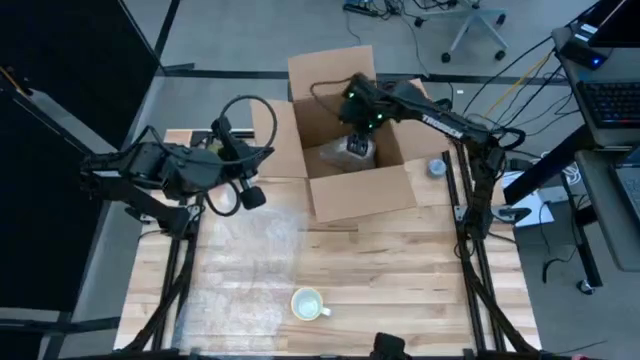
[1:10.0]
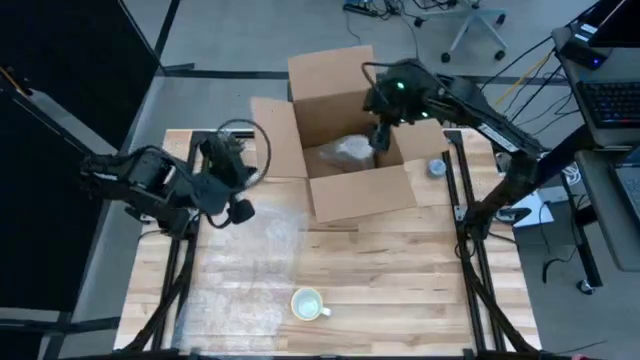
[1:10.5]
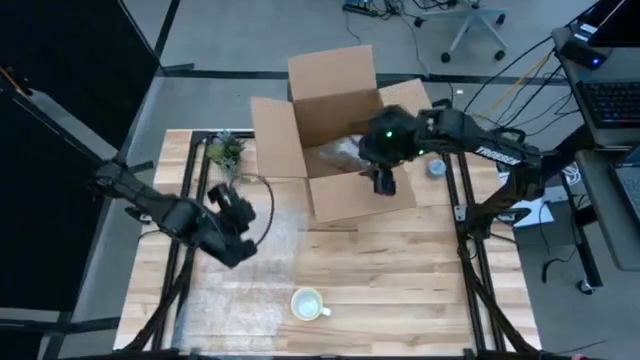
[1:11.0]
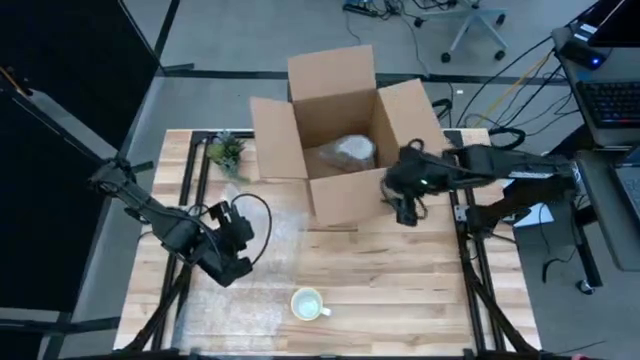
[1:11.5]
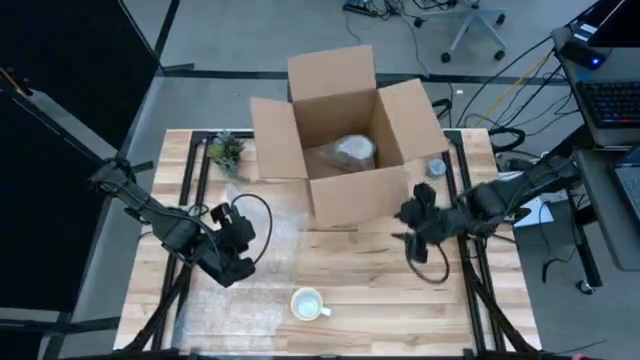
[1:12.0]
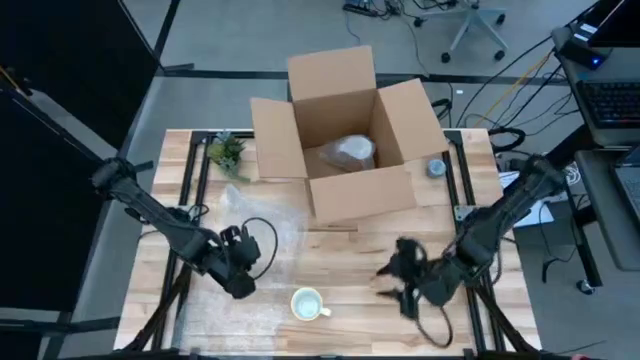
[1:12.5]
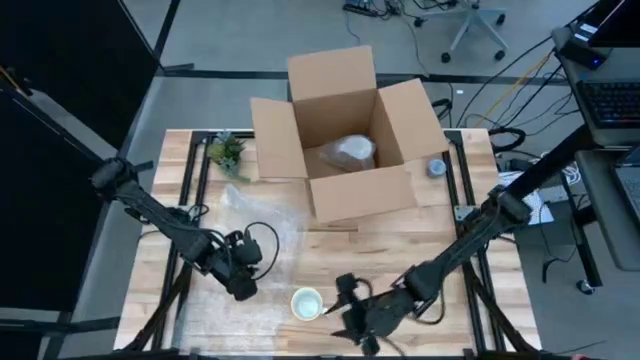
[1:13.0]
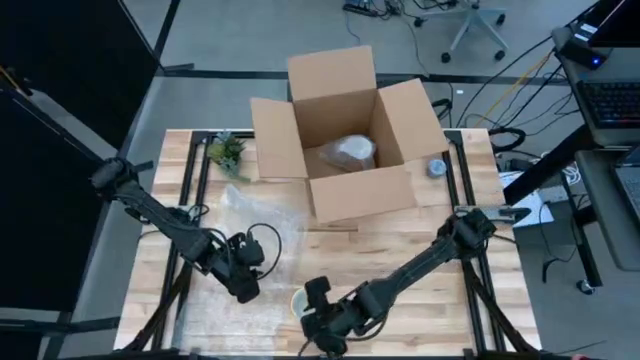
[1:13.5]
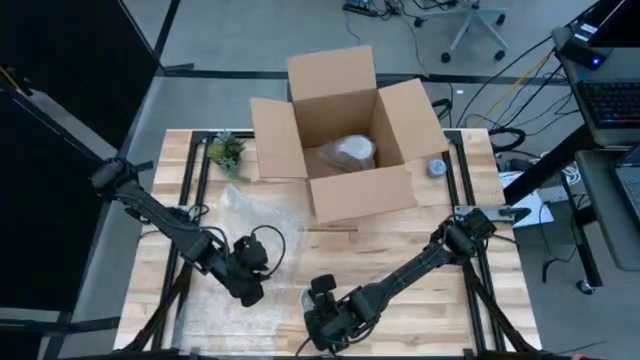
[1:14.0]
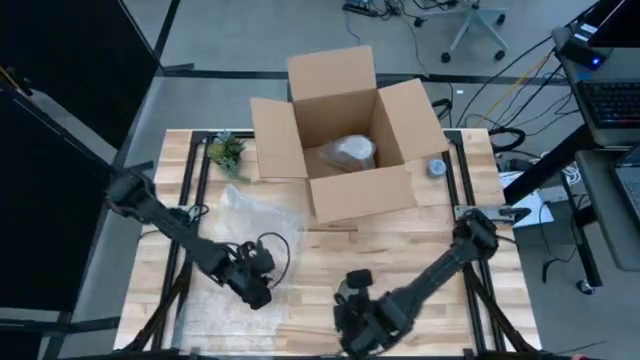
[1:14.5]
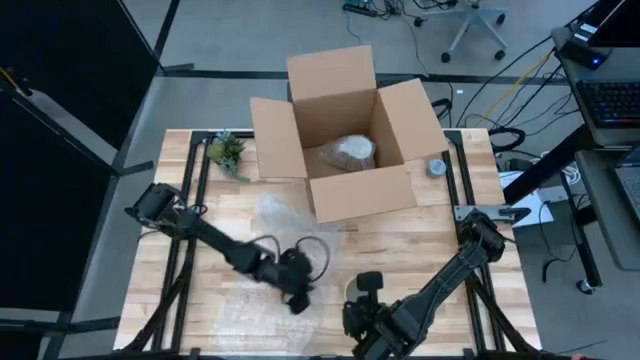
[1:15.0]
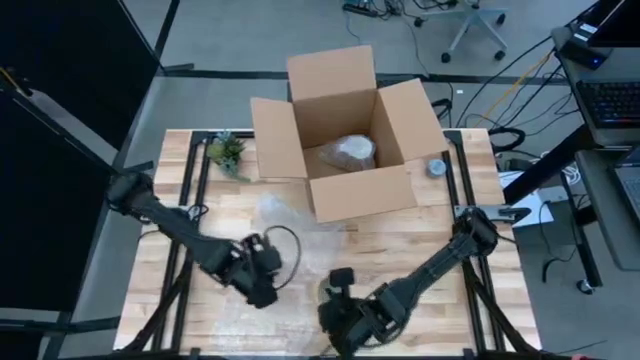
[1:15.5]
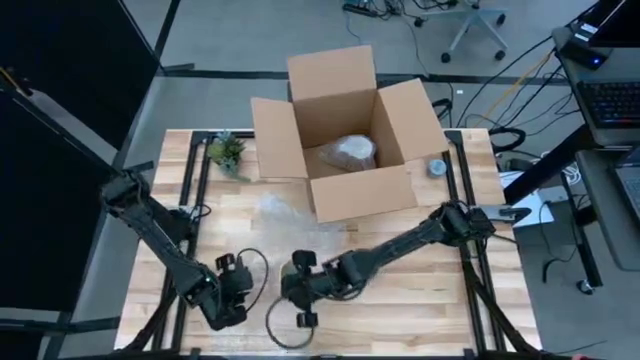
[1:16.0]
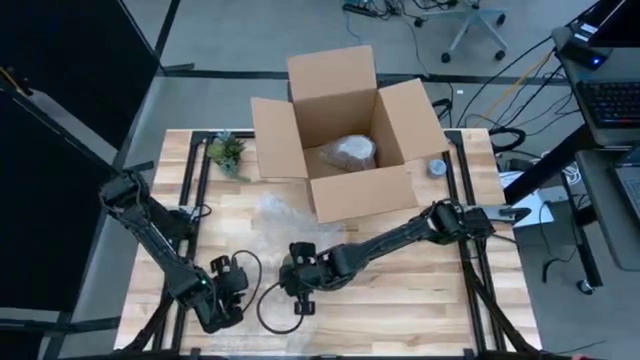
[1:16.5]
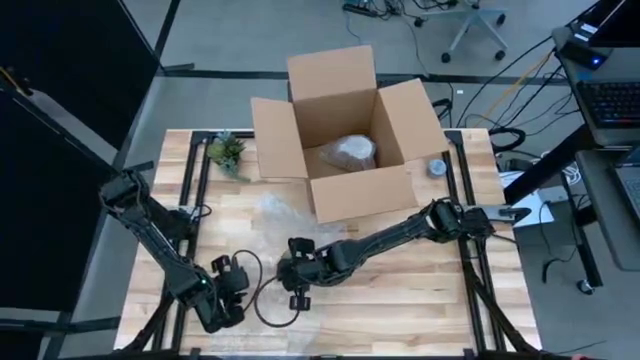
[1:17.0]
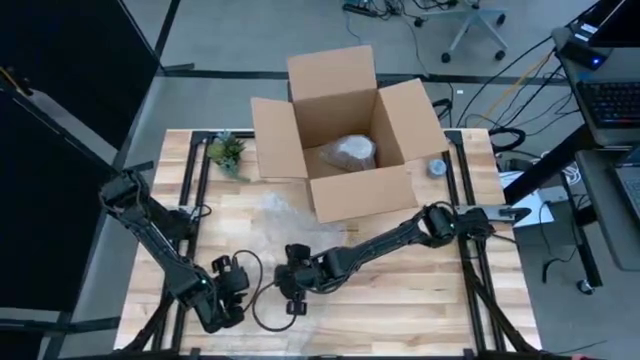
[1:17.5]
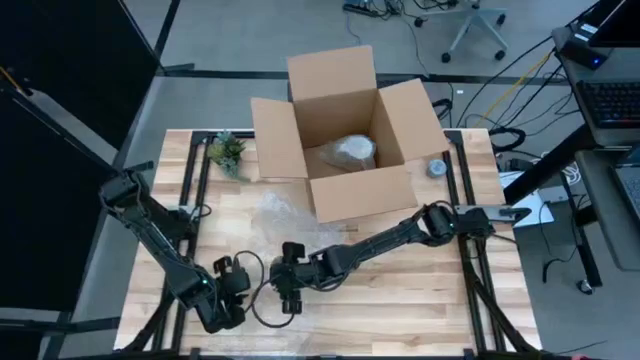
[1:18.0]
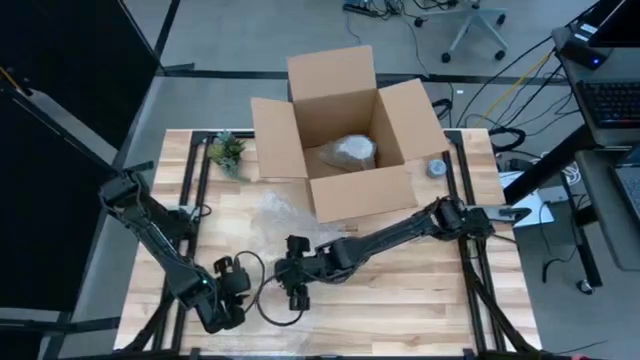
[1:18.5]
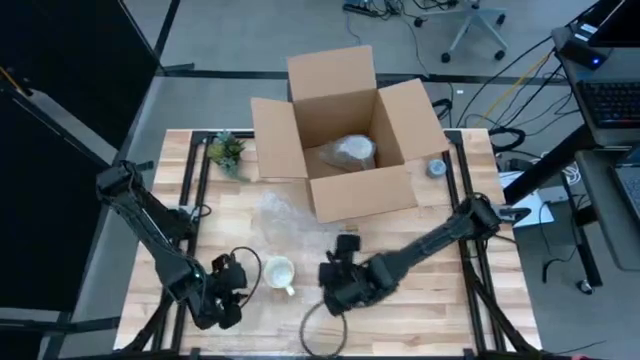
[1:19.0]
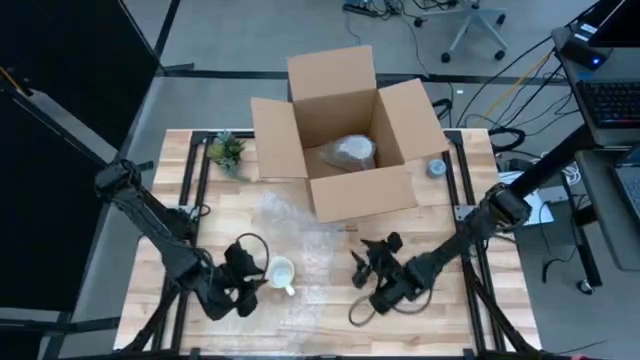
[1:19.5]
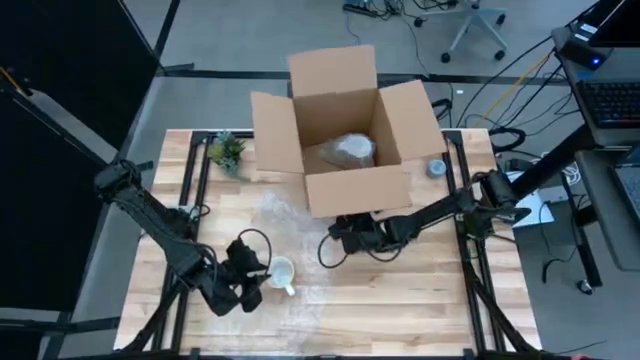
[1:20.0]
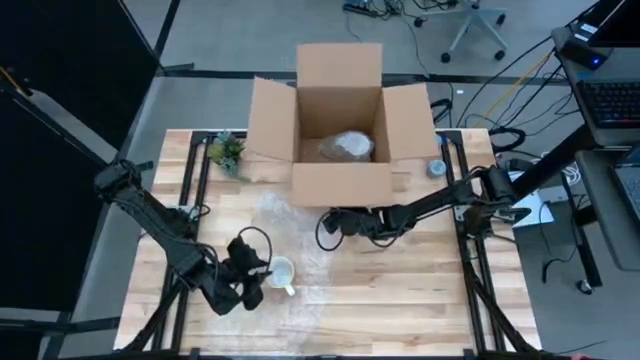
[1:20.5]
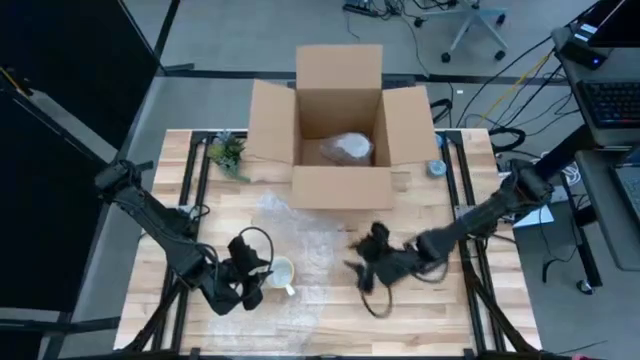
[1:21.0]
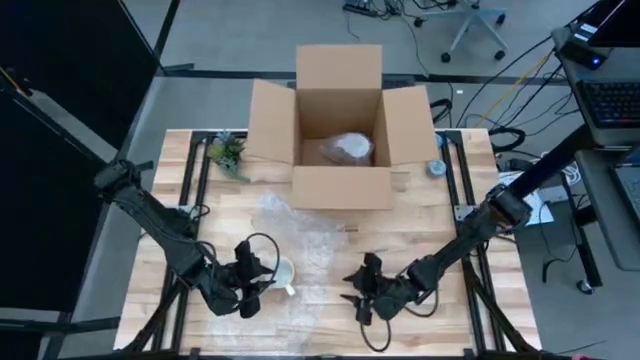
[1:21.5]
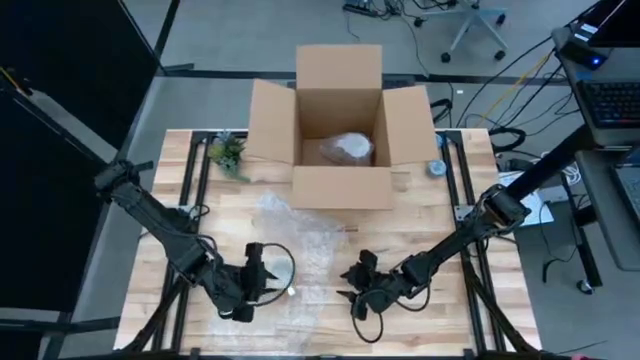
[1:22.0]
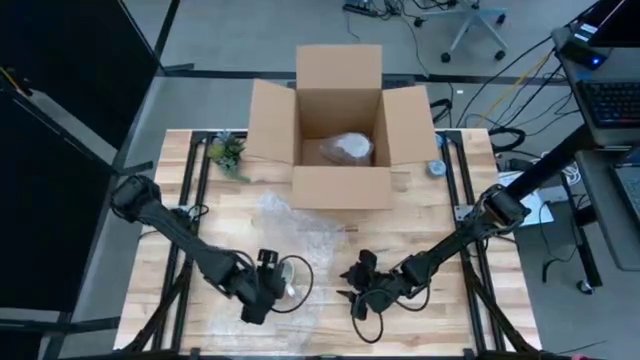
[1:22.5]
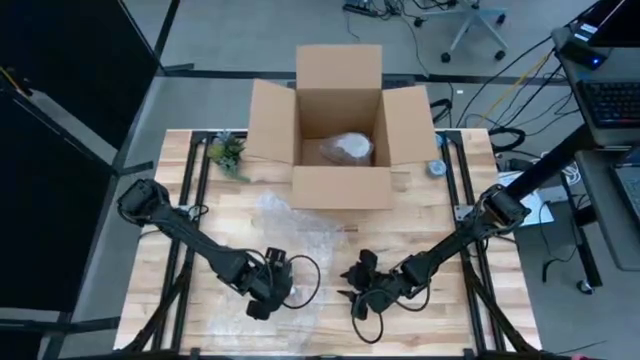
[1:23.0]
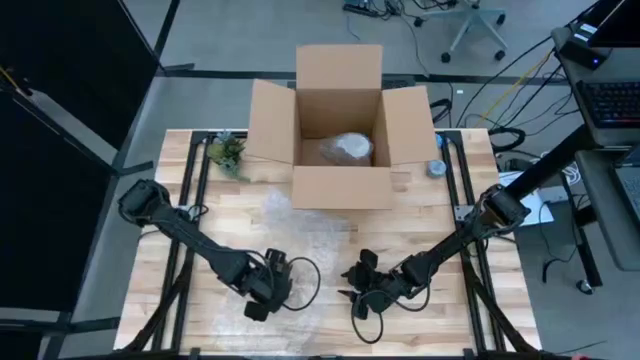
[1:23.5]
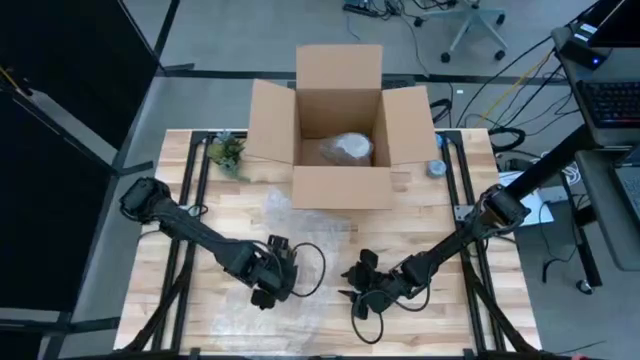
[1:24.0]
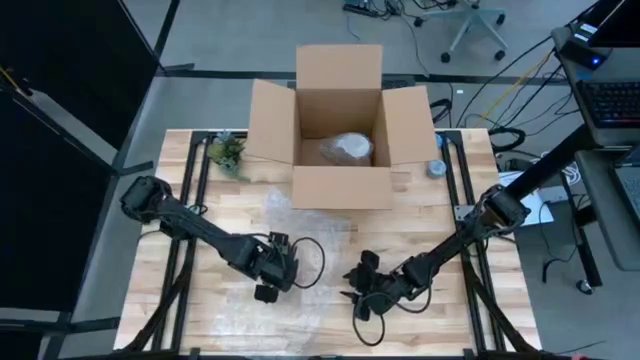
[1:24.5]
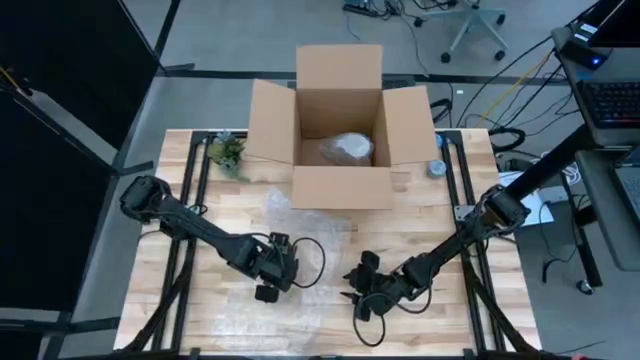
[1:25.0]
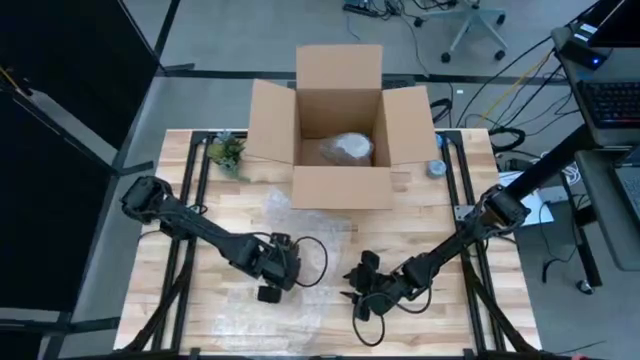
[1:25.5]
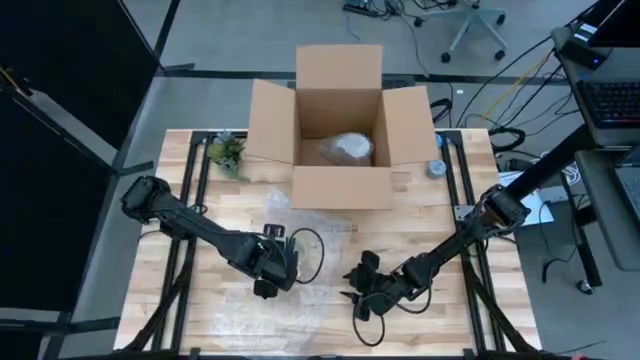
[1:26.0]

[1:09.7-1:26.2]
Task: wrap mug
Wrap the orange mug with bubble wrap

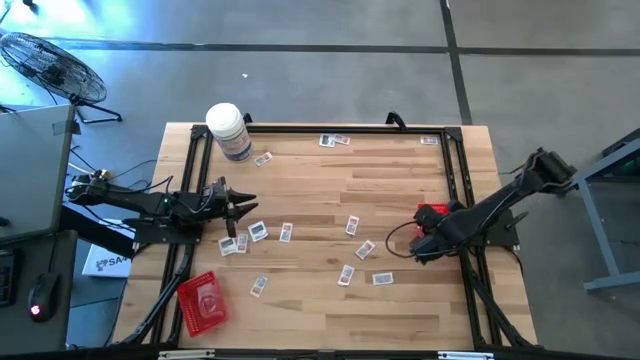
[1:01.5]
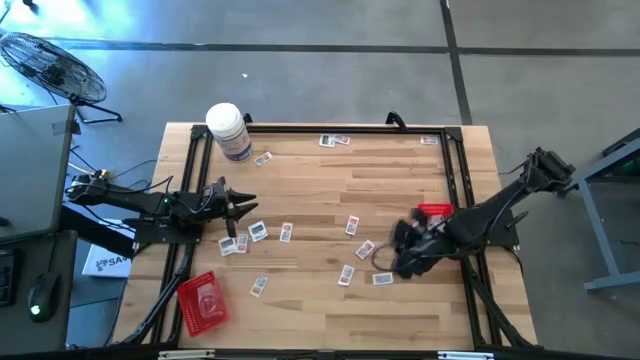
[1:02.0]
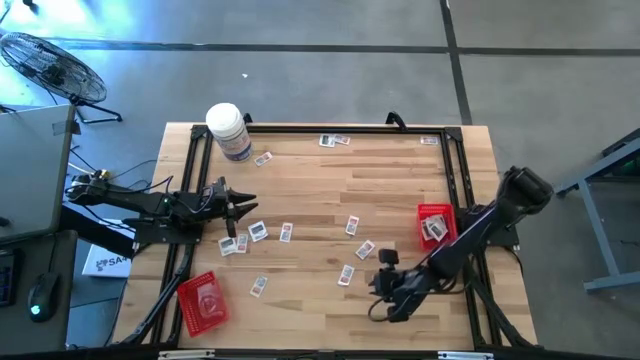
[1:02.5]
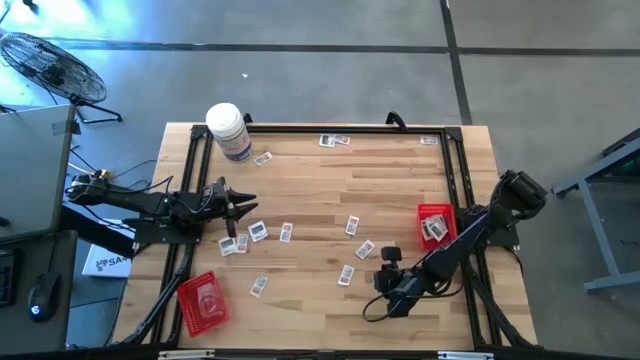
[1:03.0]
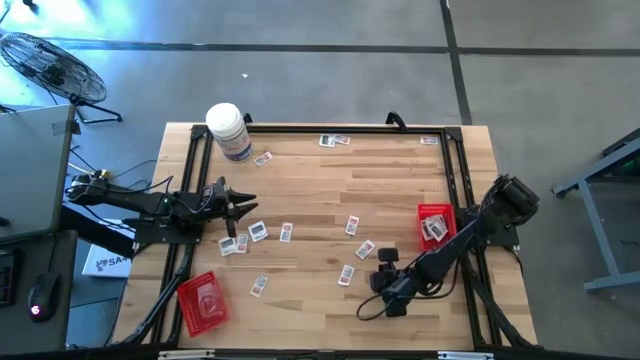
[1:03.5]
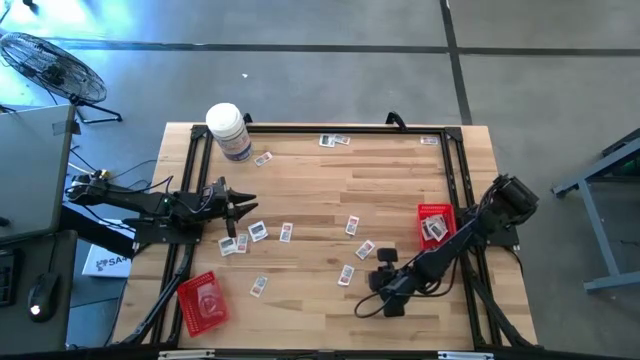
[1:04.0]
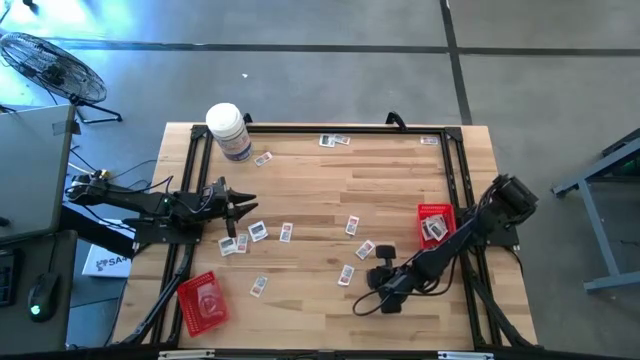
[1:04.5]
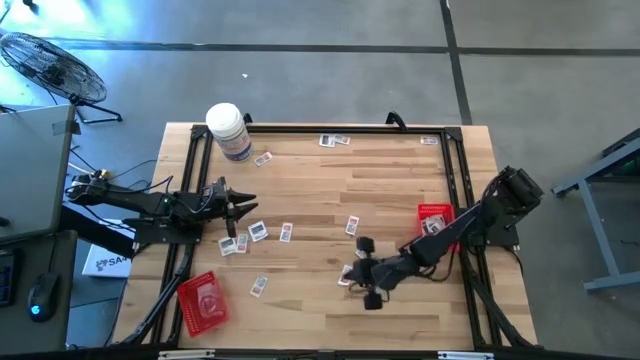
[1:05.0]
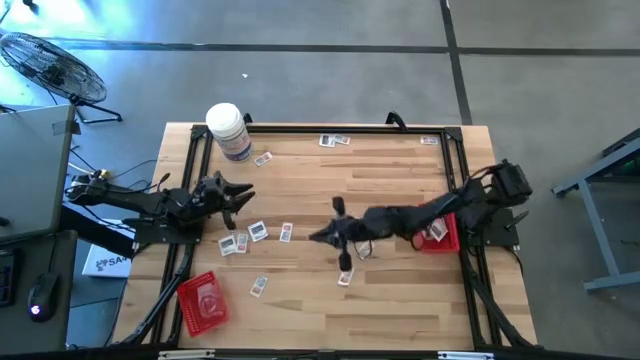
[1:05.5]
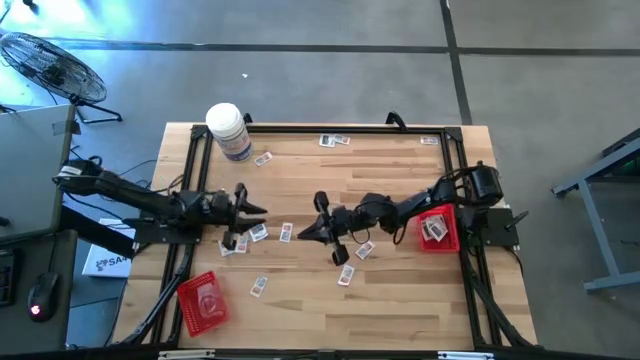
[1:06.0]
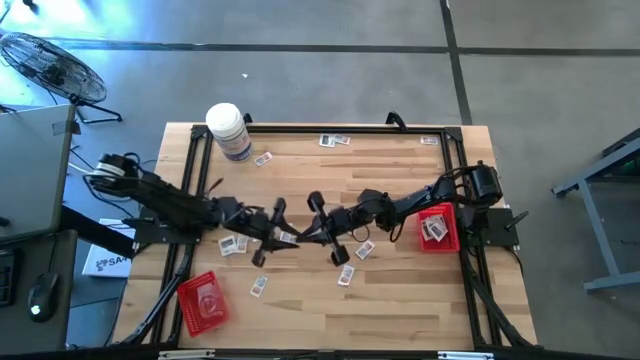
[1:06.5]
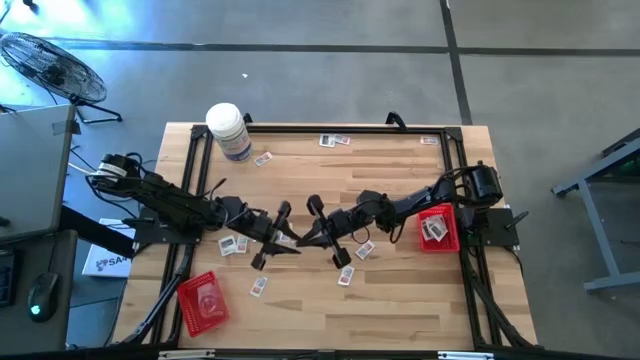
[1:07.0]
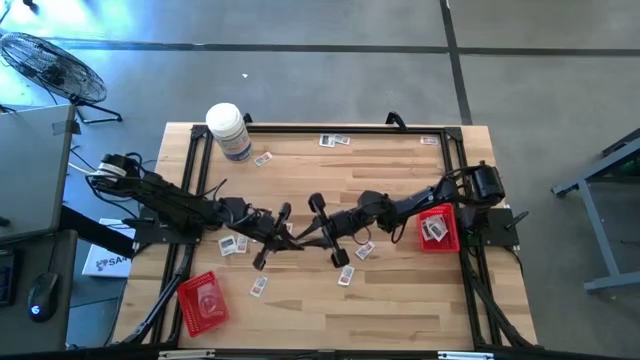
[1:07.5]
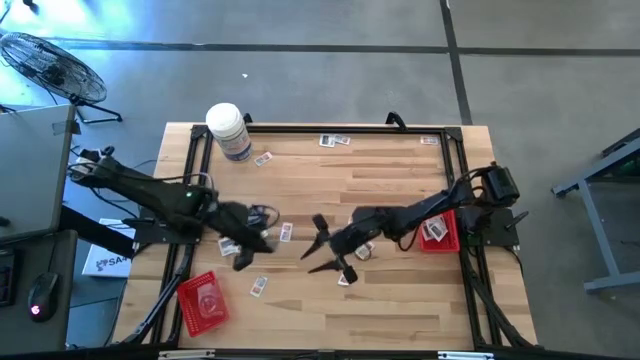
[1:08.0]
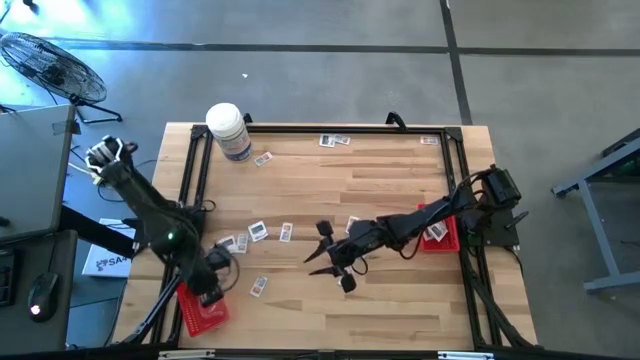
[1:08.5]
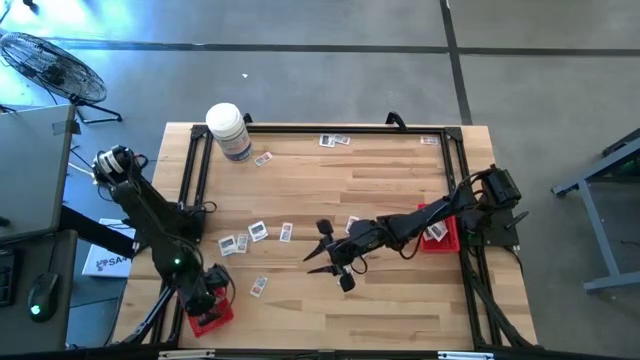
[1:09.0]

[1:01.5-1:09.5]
Task: Pick & Place First Aid Supplies
Put the ointment pack into the left red bin
